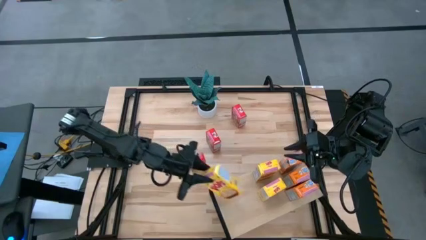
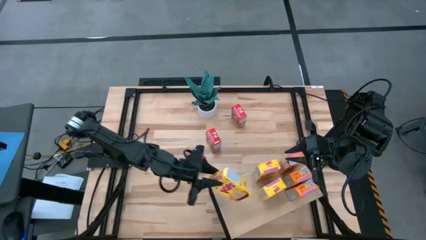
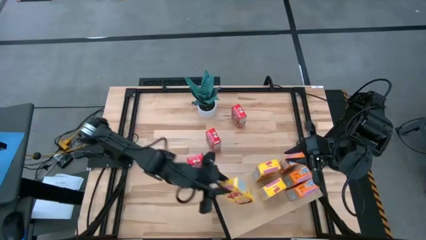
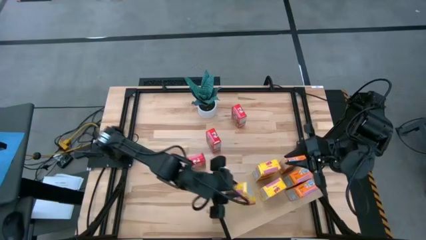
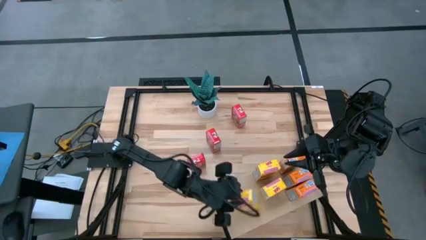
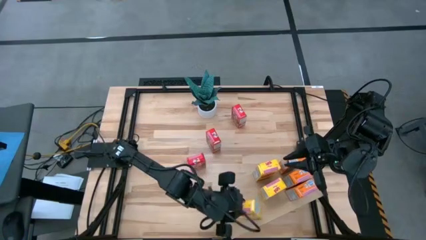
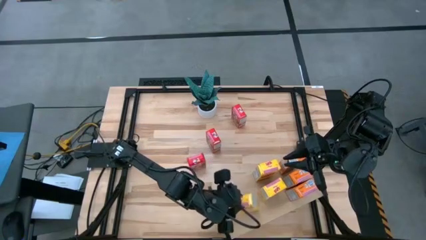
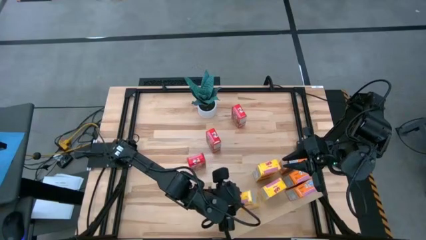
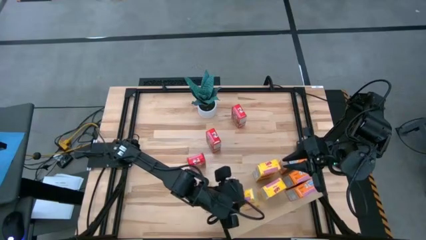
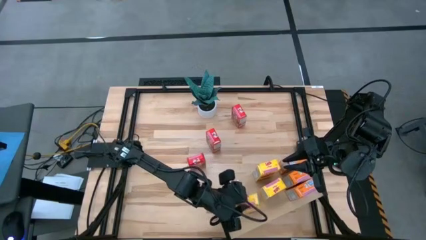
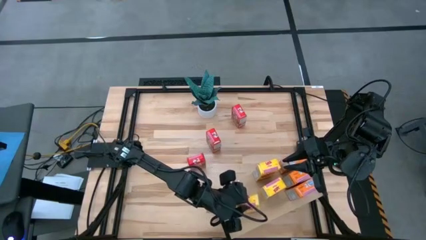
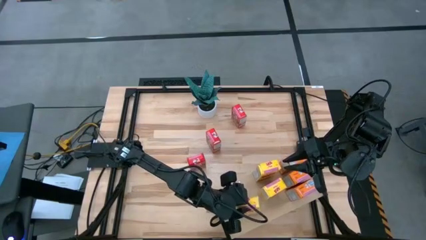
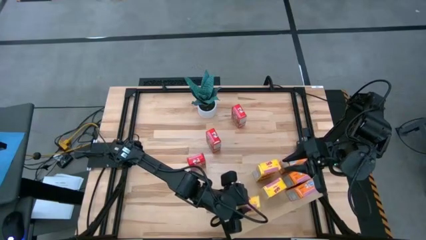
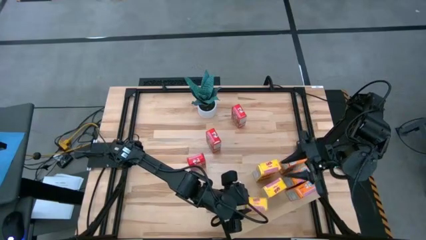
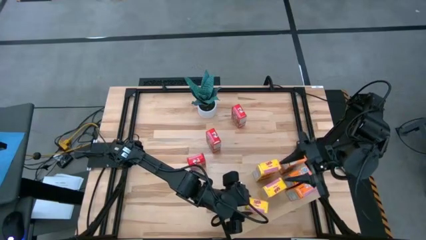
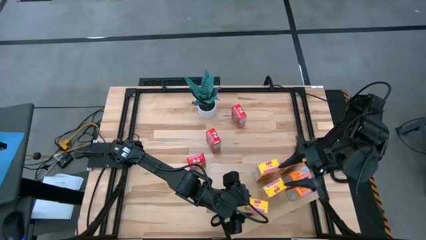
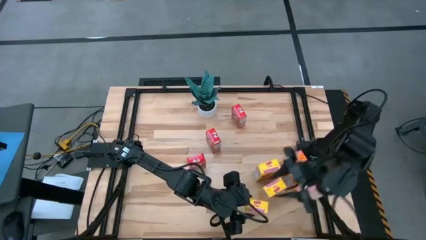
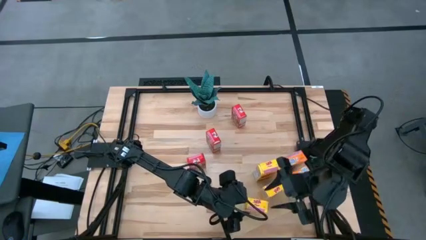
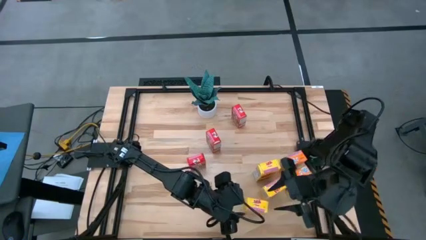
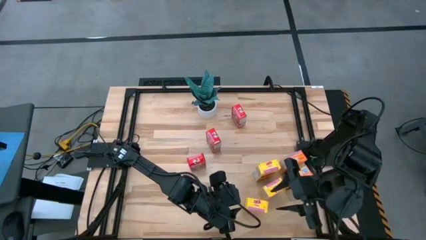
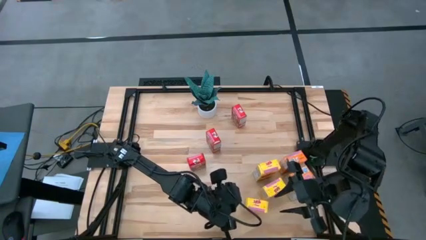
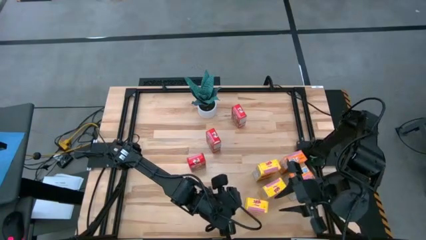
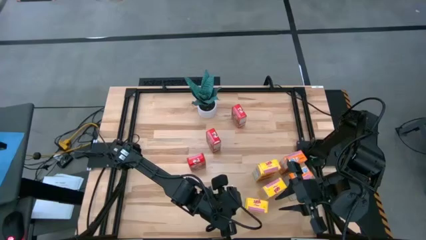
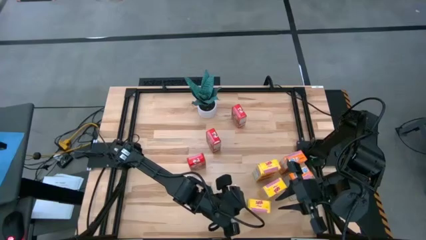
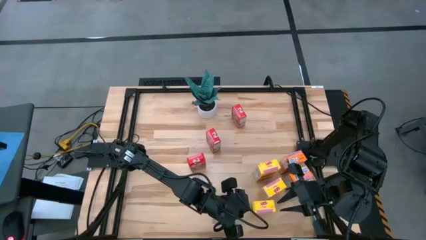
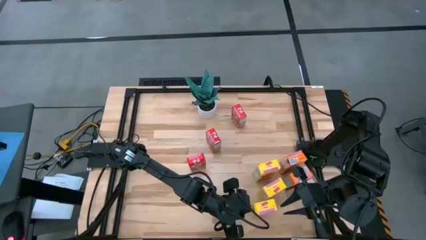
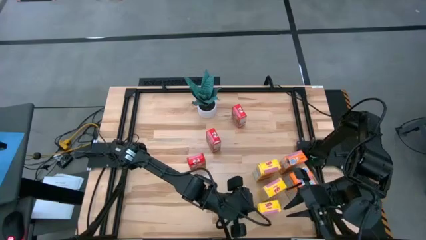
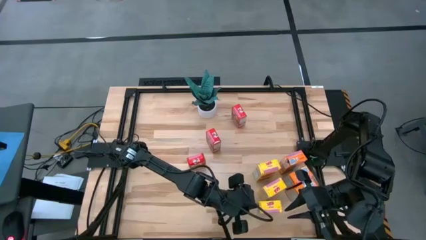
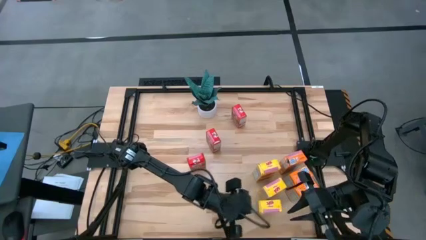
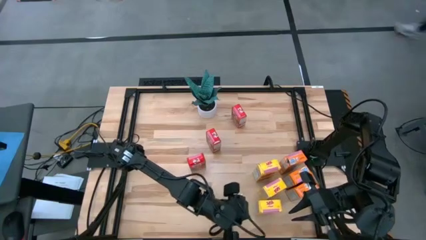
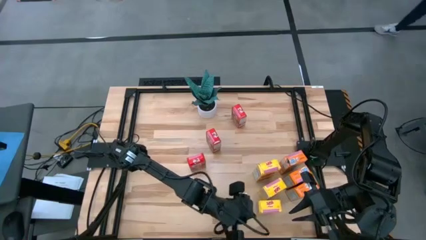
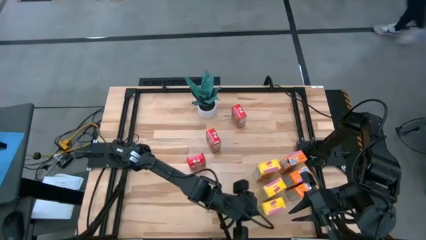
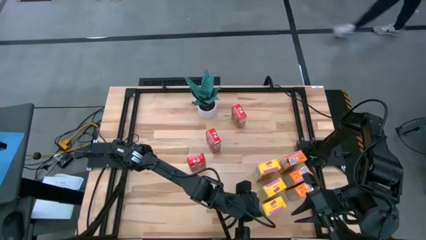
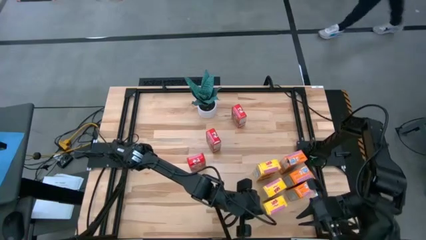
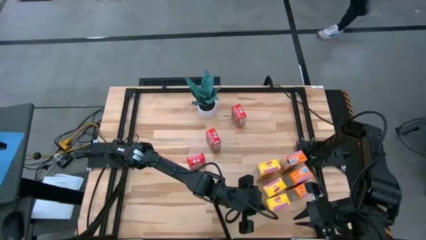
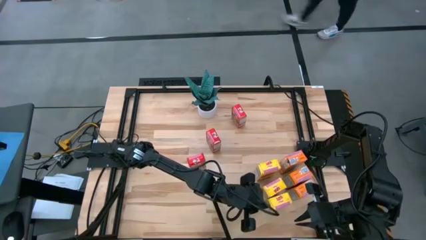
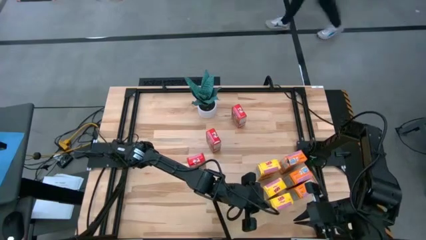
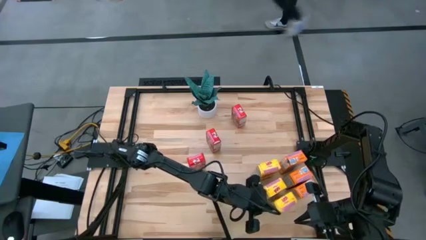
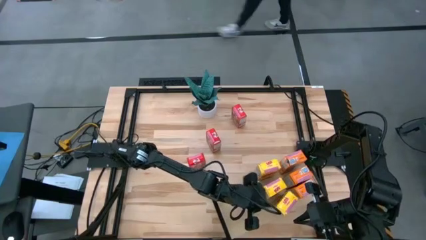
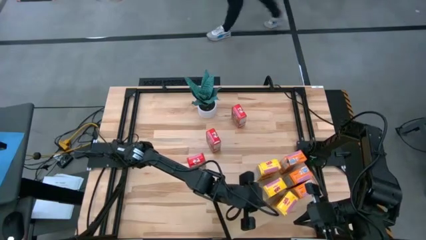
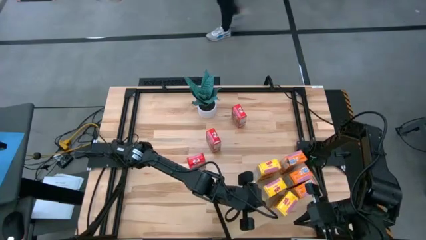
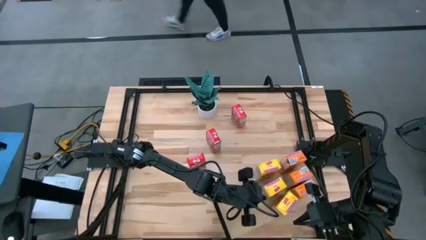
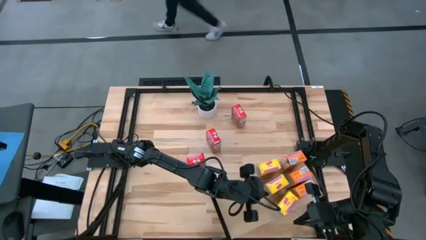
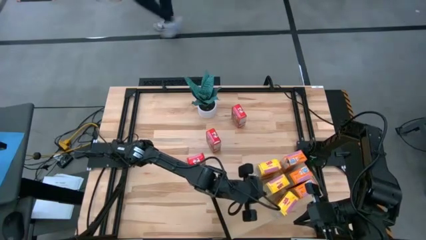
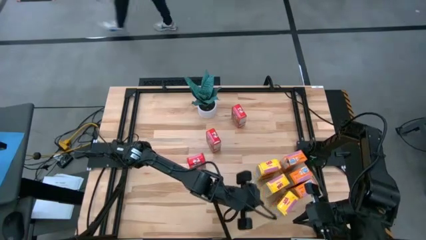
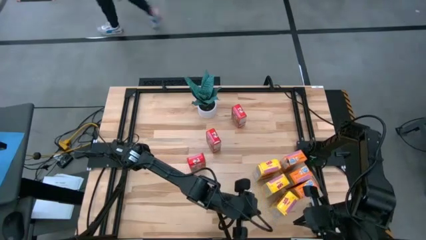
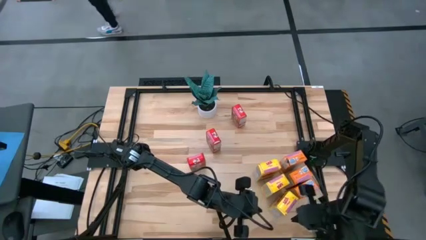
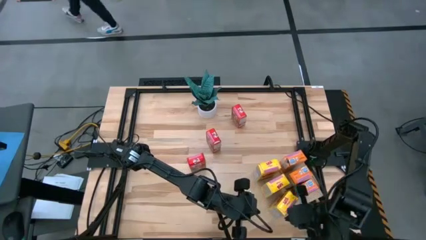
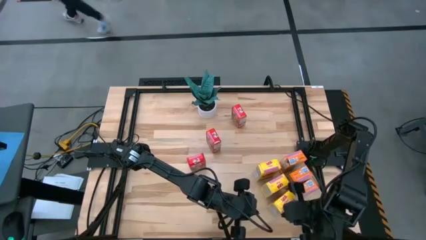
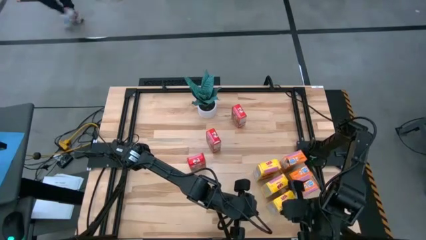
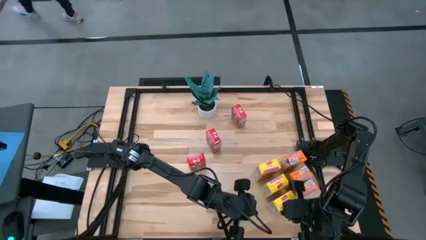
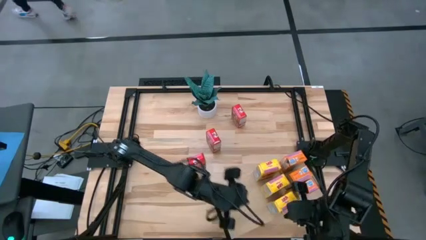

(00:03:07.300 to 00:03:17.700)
Task: Stack cereal on shelf
Put the yellow cereal box on the shelf aligned with the other yellow cereal boxes
